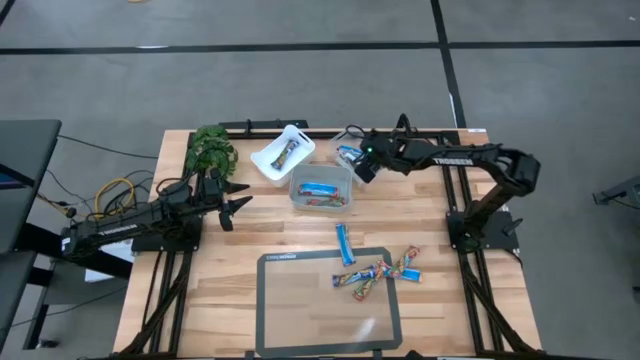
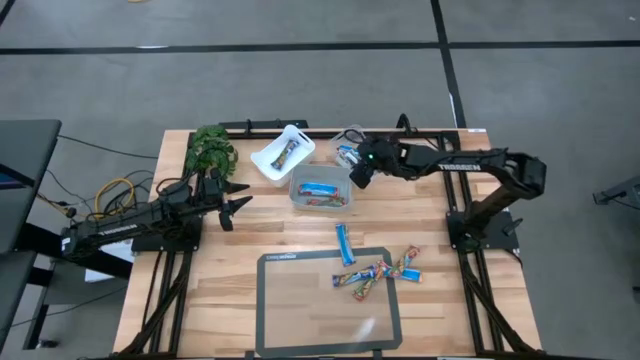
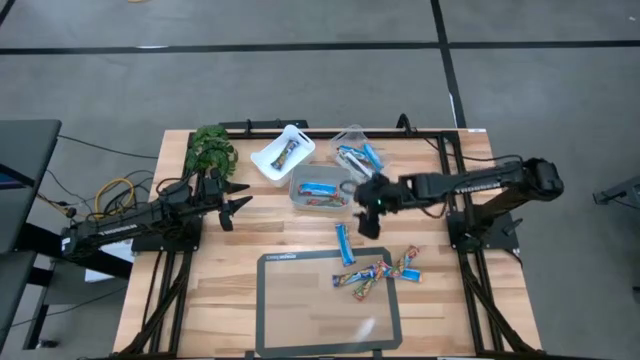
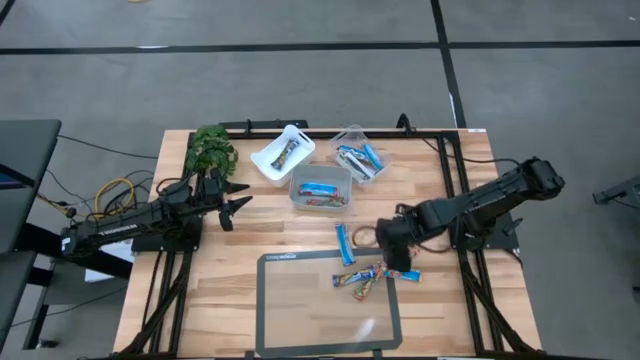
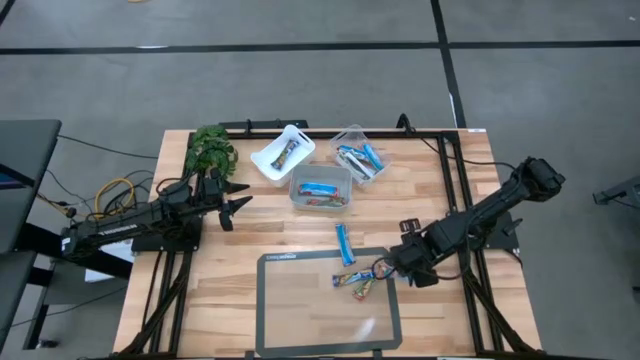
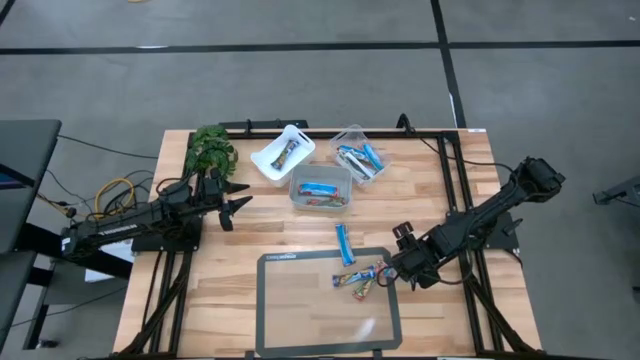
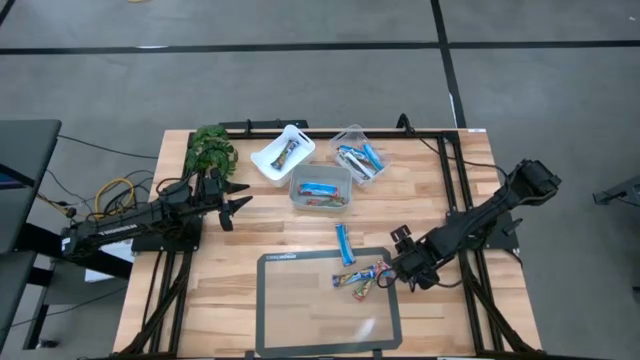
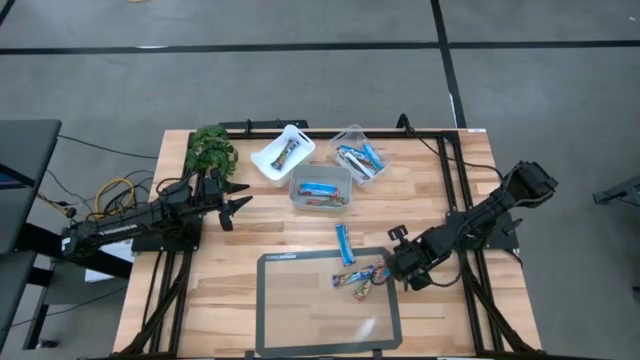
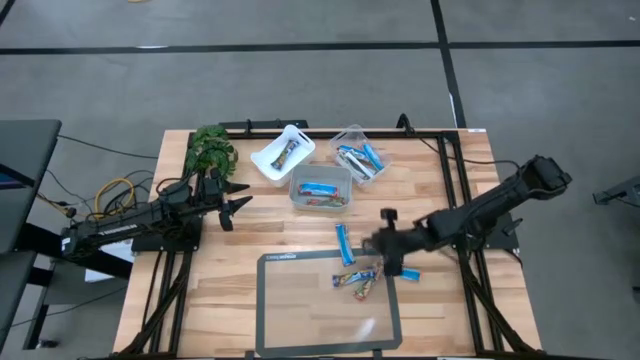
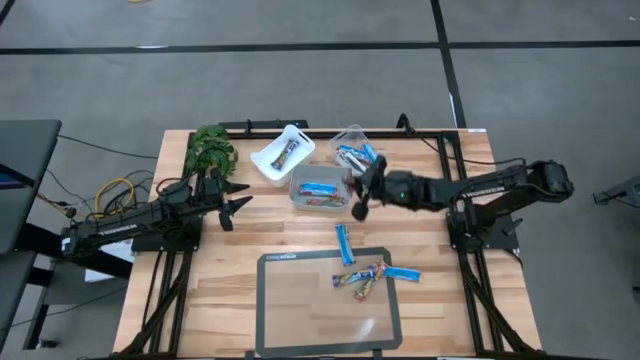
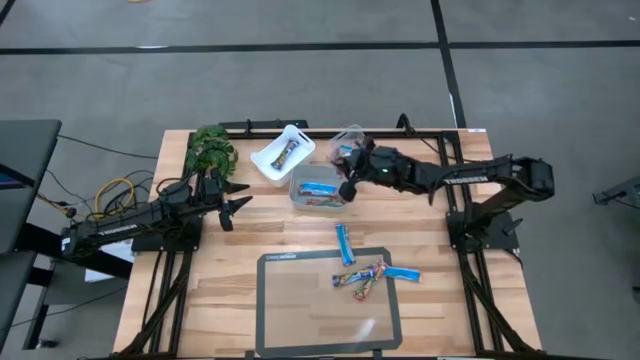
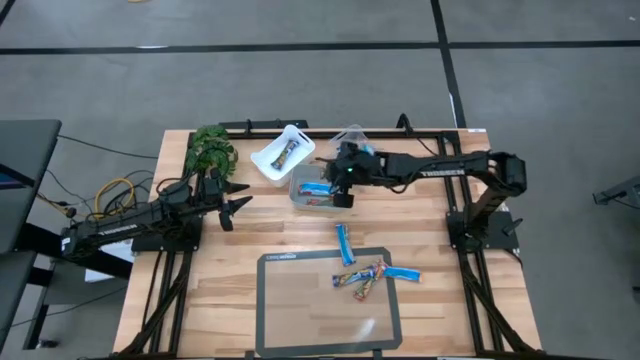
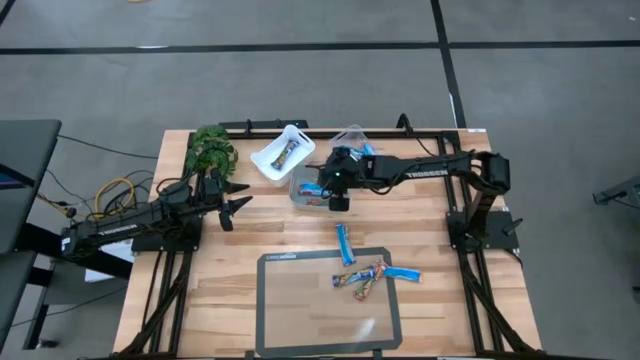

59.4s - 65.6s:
Task: Pick and place Granola Bars by type
Put the red granola bar into the gray bin

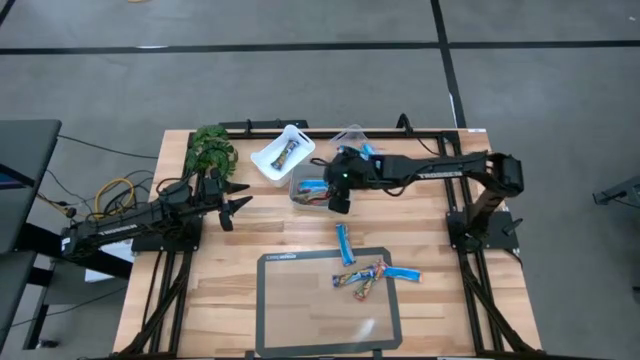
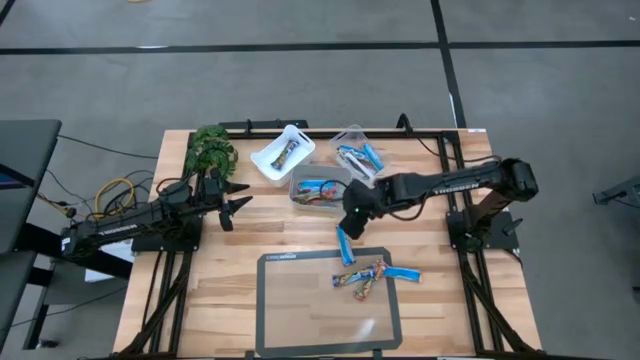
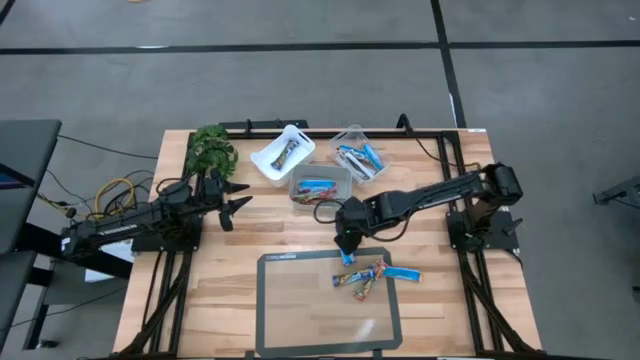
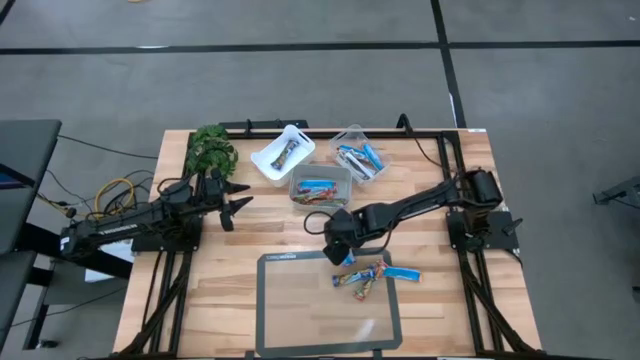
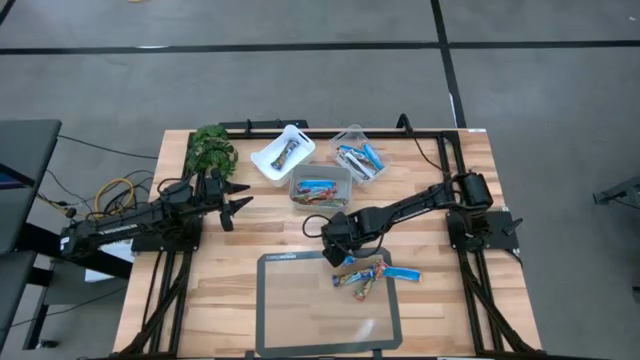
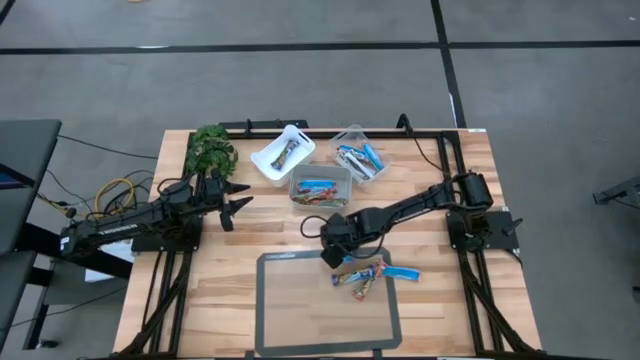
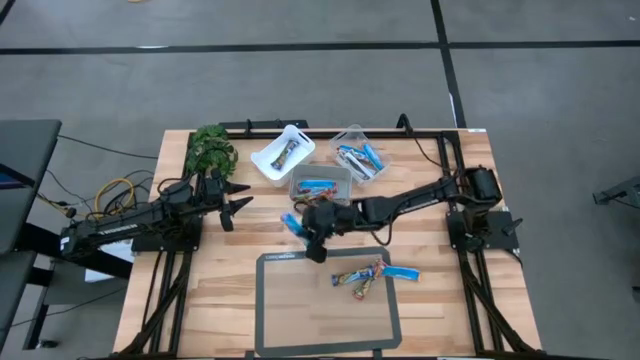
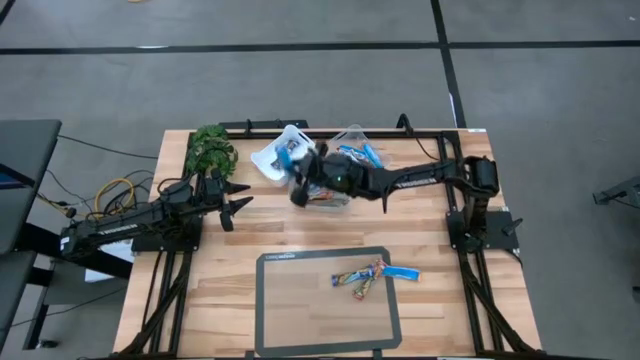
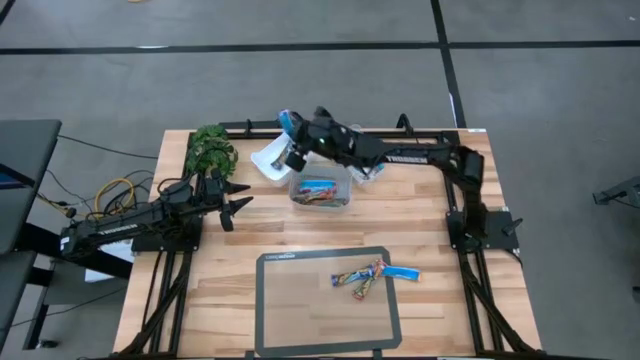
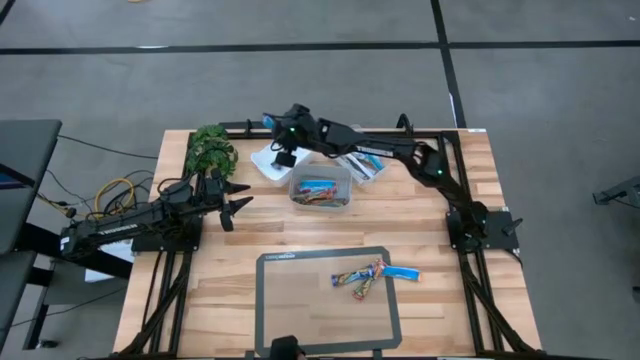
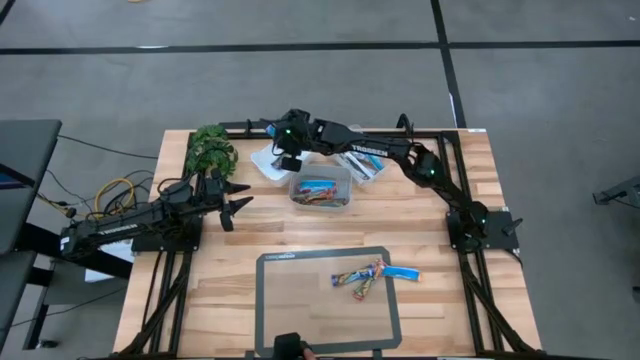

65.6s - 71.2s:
Put the blue granola bar into the white bin

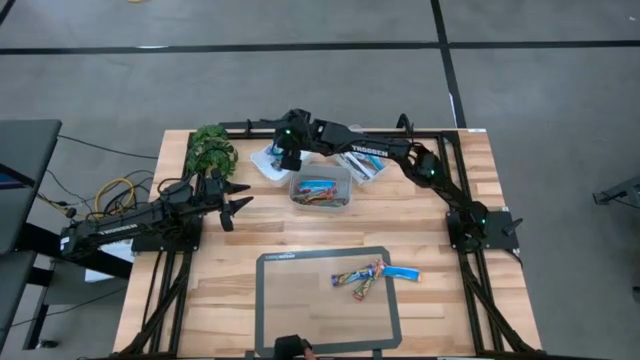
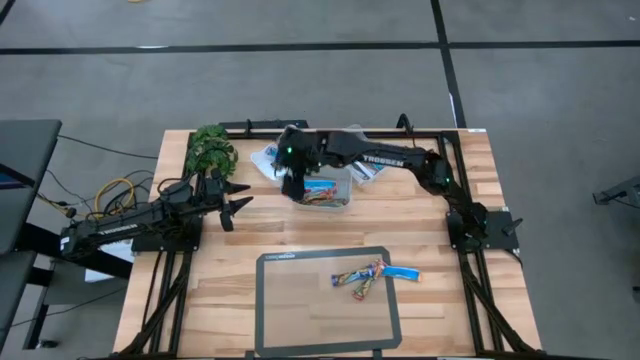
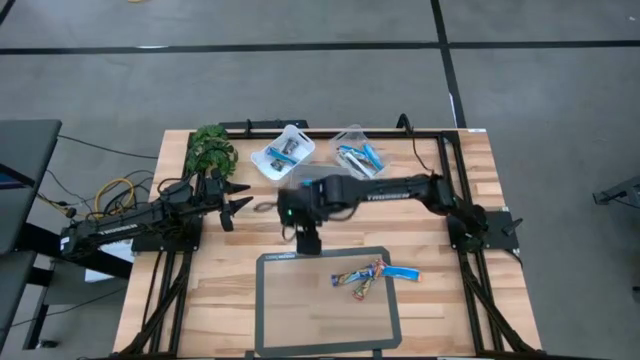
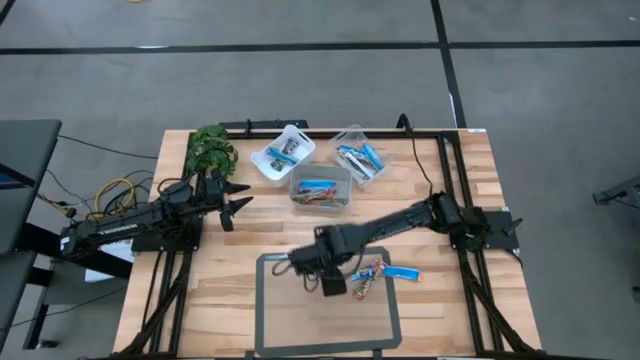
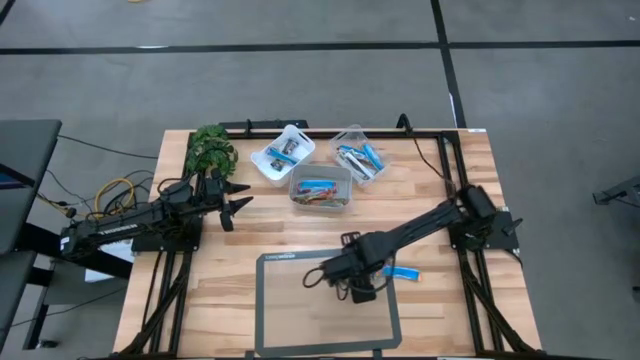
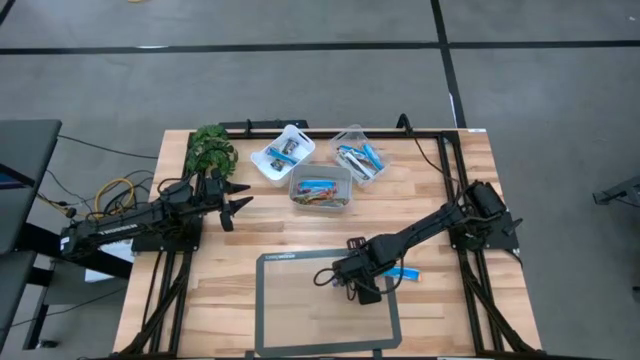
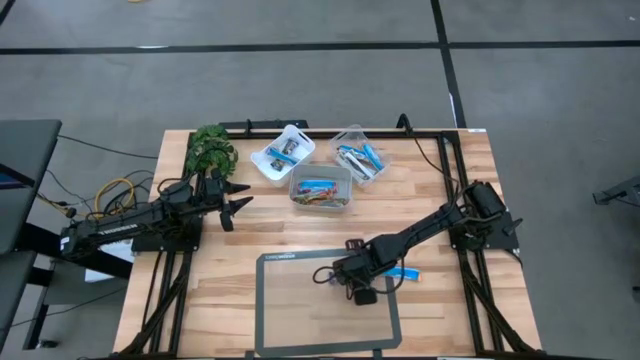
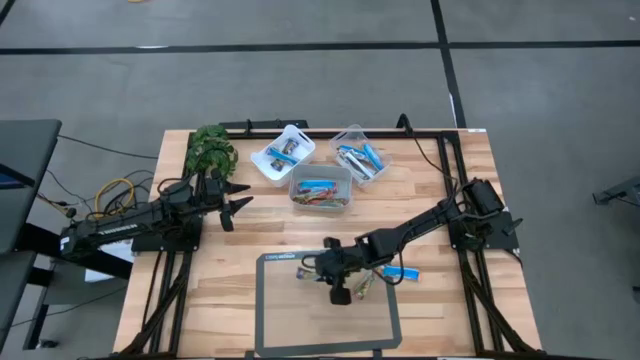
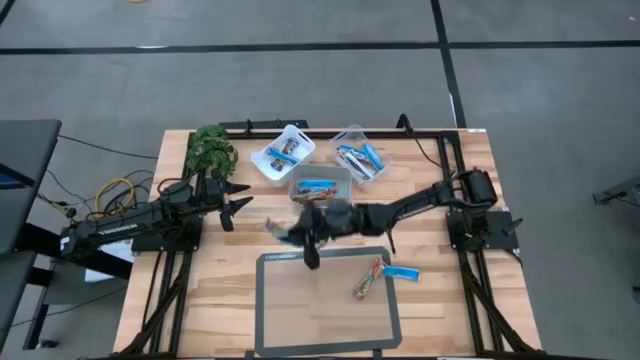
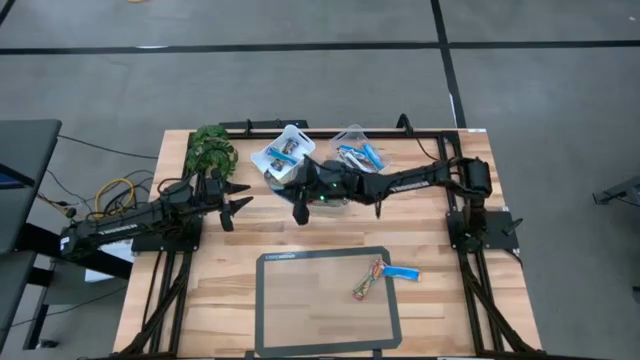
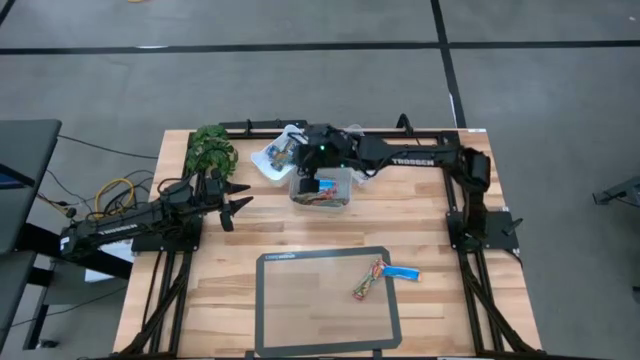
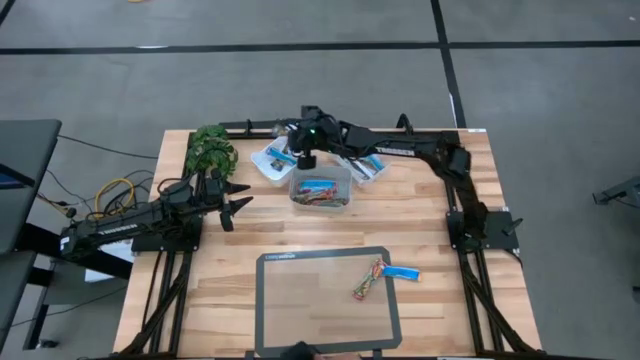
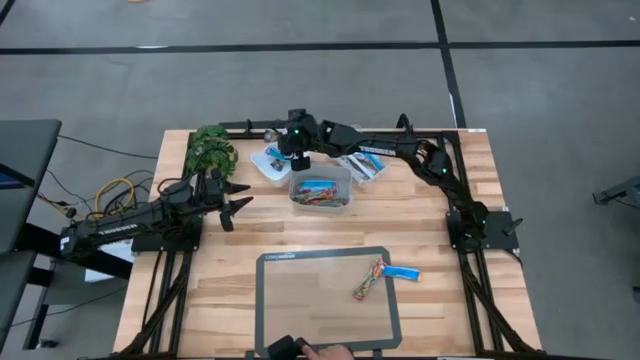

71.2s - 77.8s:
Put the blue granola bar into the white bin

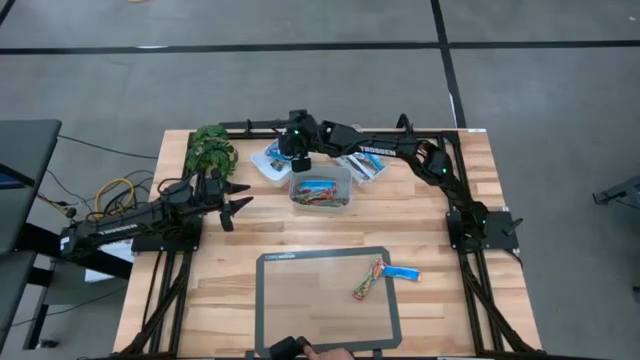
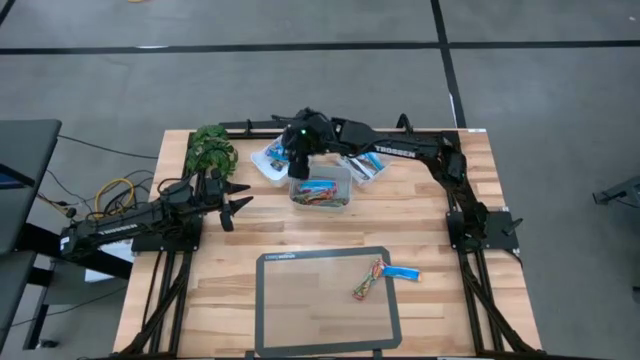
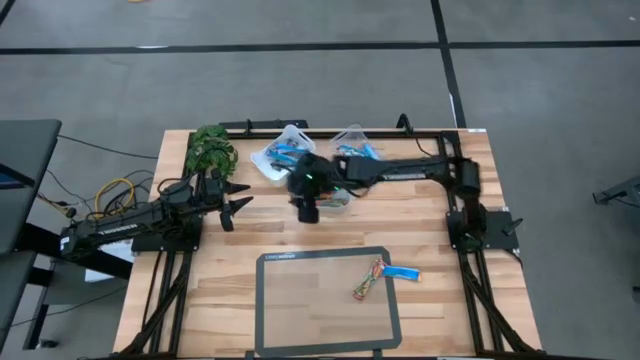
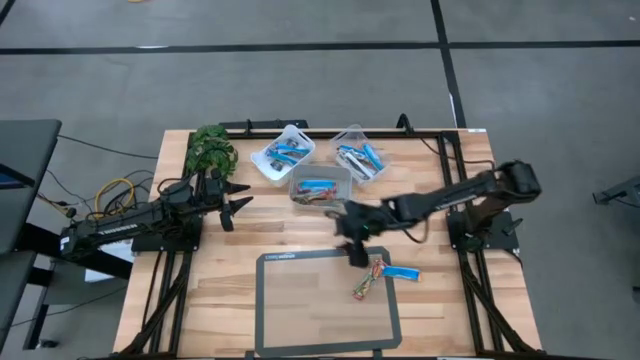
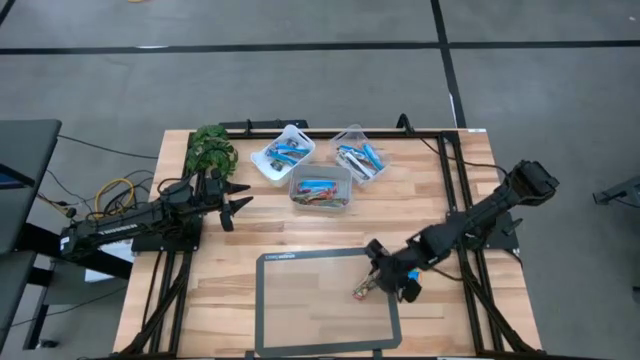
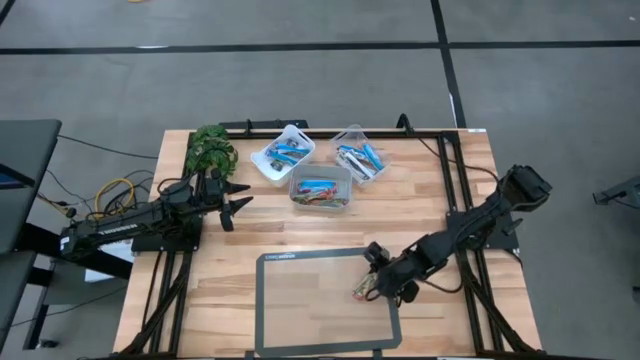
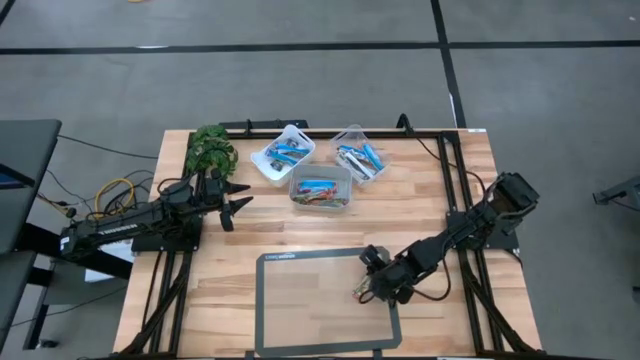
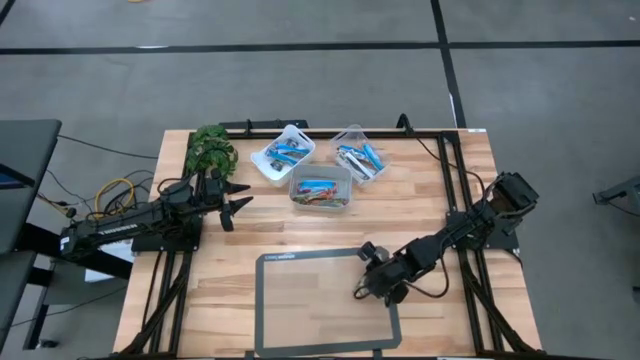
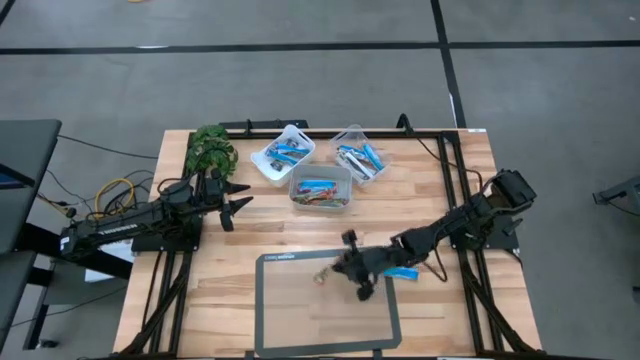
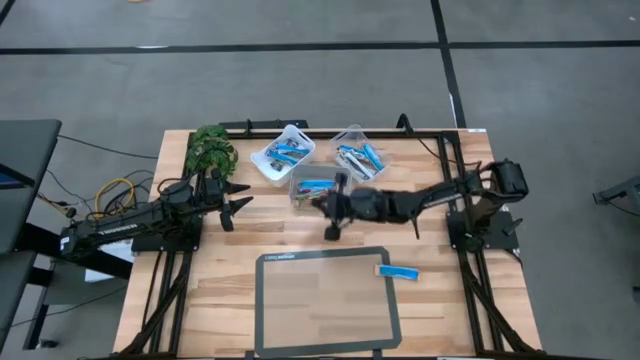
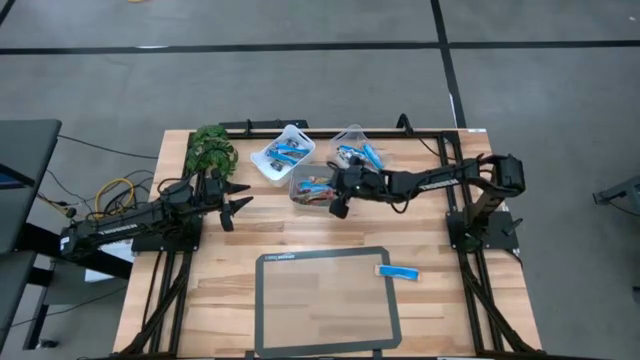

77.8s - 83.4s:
Put the red granola bar into the gray bin
